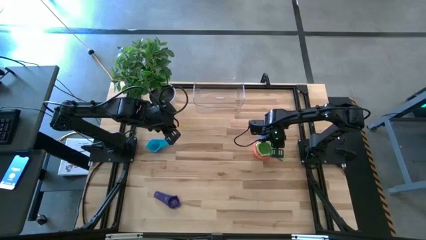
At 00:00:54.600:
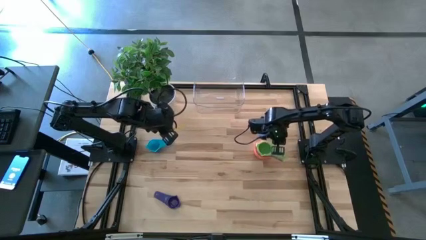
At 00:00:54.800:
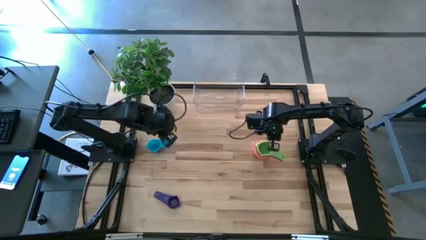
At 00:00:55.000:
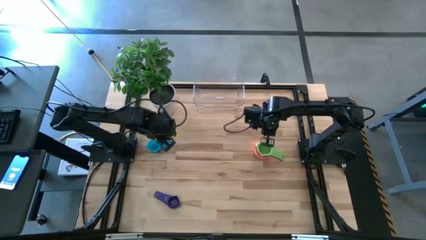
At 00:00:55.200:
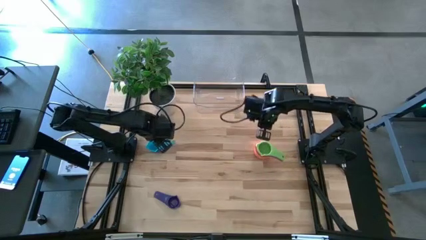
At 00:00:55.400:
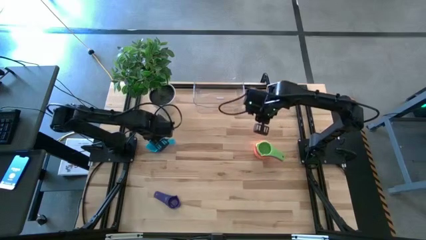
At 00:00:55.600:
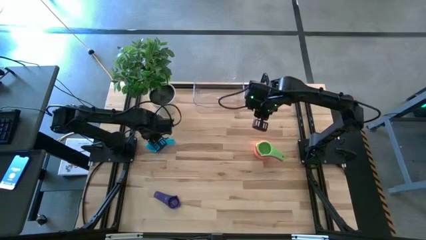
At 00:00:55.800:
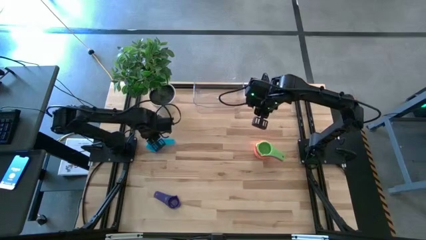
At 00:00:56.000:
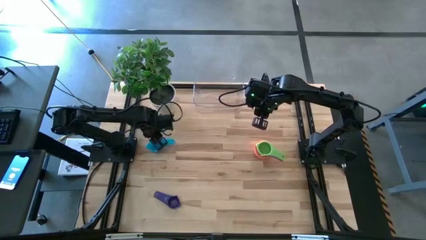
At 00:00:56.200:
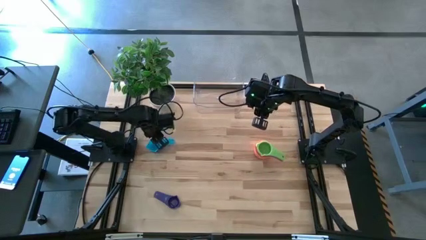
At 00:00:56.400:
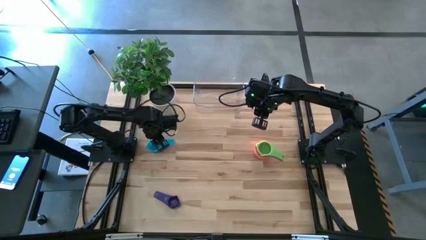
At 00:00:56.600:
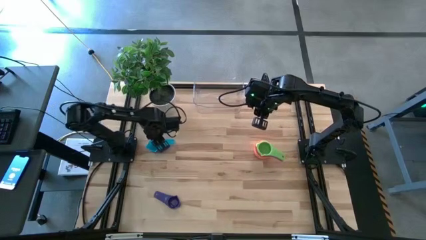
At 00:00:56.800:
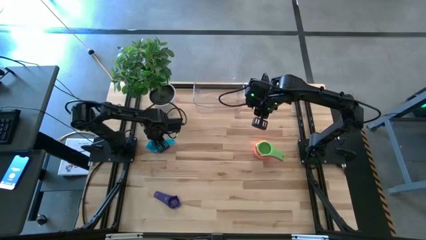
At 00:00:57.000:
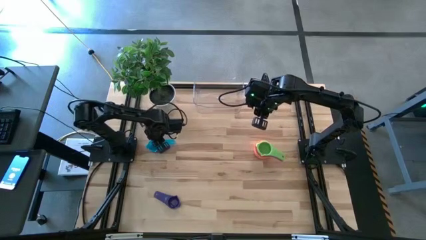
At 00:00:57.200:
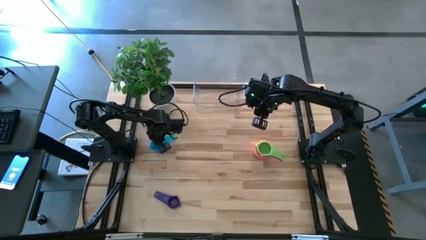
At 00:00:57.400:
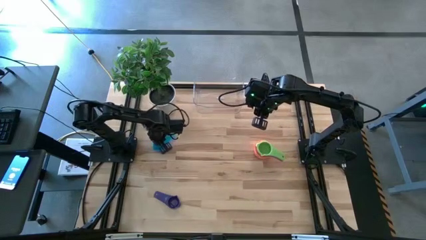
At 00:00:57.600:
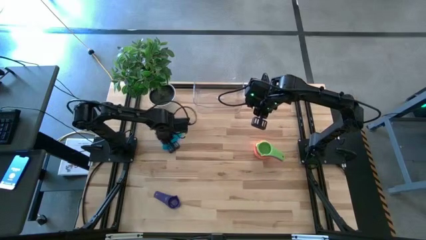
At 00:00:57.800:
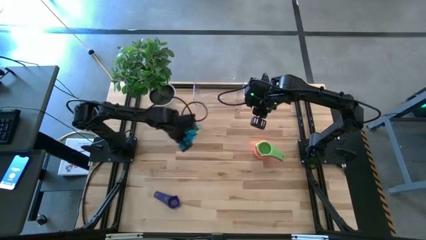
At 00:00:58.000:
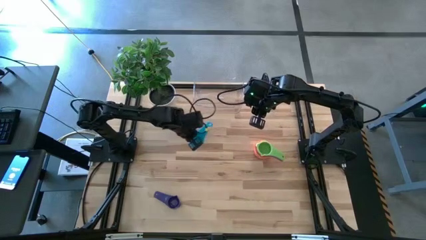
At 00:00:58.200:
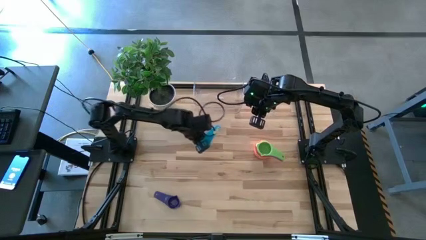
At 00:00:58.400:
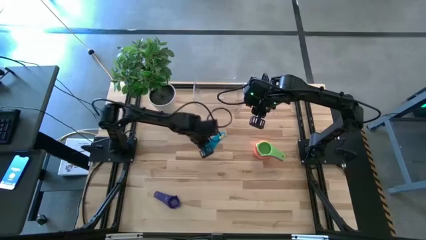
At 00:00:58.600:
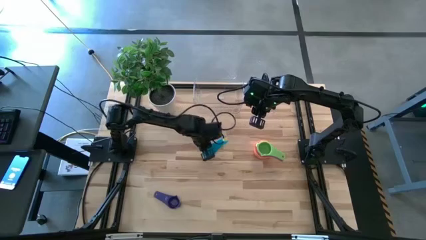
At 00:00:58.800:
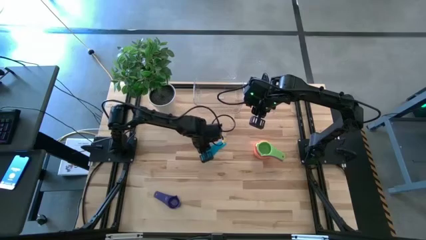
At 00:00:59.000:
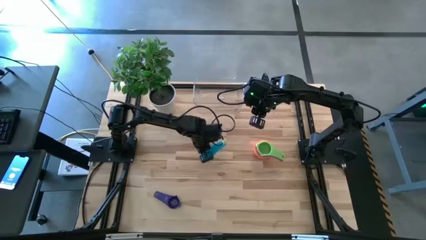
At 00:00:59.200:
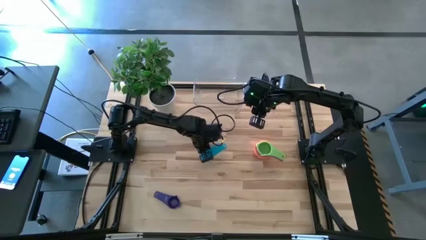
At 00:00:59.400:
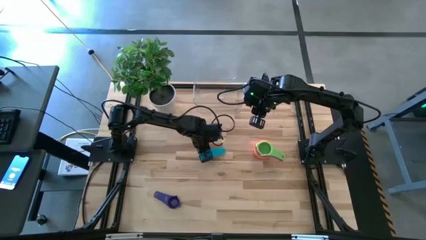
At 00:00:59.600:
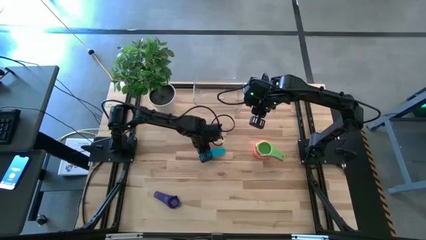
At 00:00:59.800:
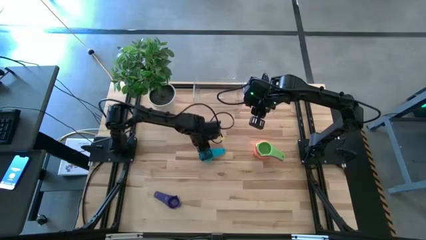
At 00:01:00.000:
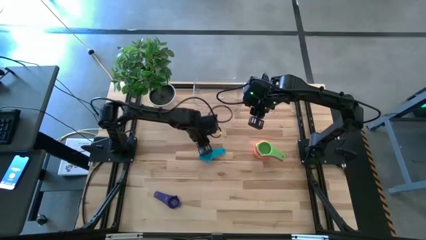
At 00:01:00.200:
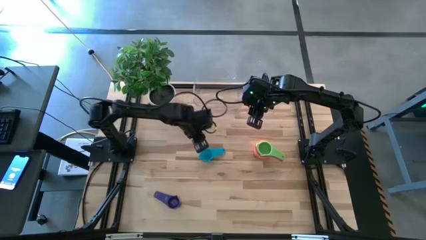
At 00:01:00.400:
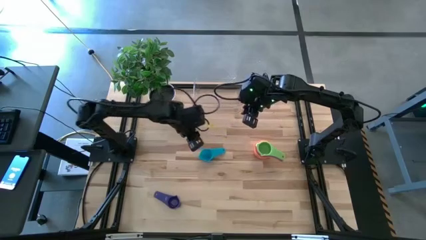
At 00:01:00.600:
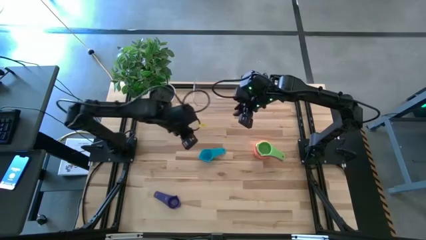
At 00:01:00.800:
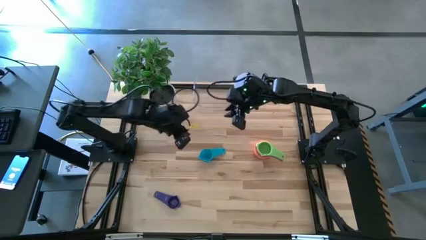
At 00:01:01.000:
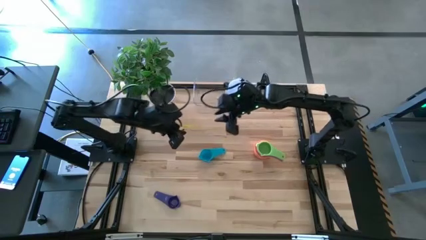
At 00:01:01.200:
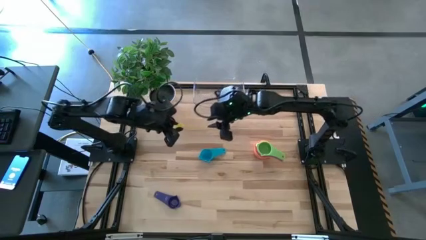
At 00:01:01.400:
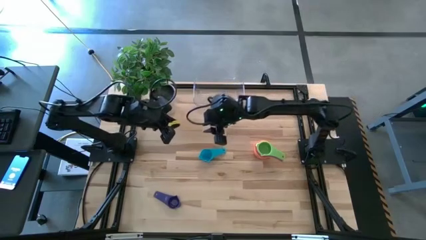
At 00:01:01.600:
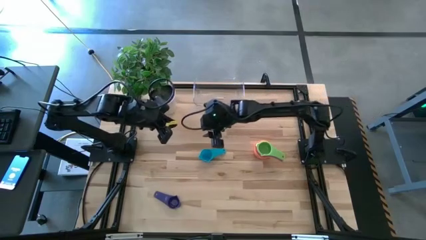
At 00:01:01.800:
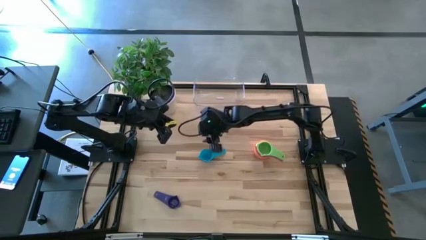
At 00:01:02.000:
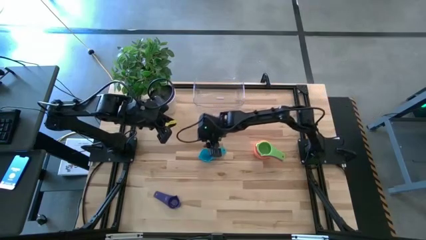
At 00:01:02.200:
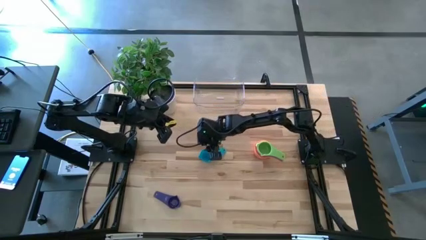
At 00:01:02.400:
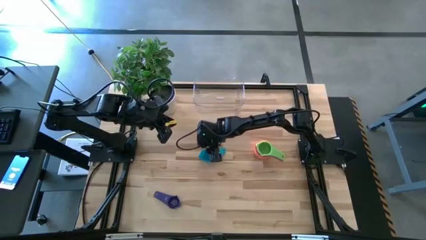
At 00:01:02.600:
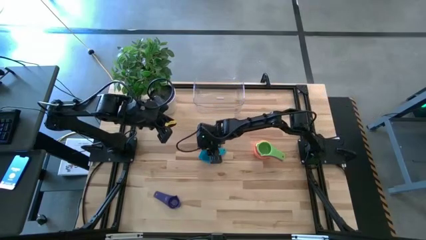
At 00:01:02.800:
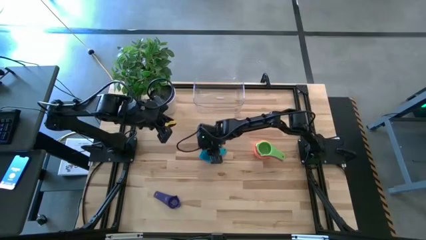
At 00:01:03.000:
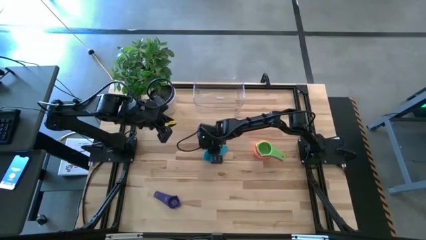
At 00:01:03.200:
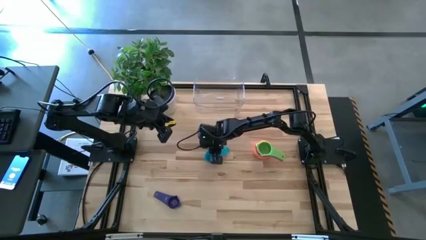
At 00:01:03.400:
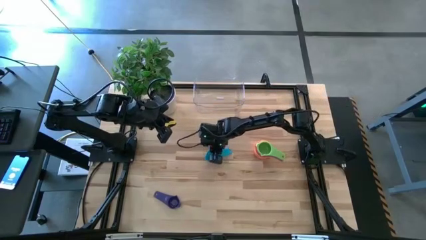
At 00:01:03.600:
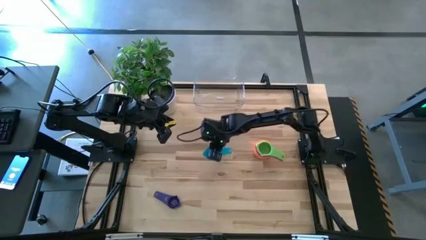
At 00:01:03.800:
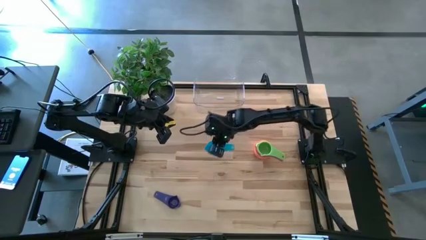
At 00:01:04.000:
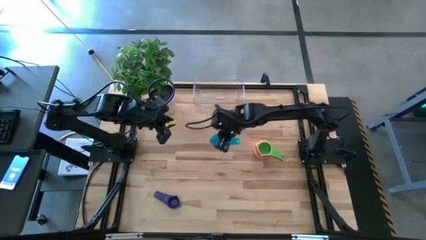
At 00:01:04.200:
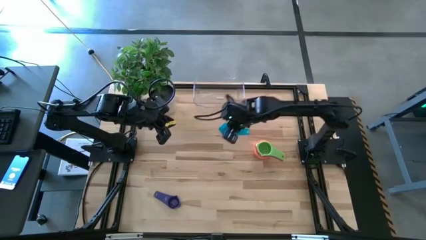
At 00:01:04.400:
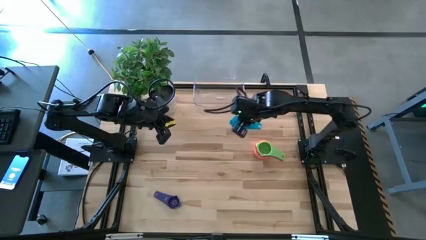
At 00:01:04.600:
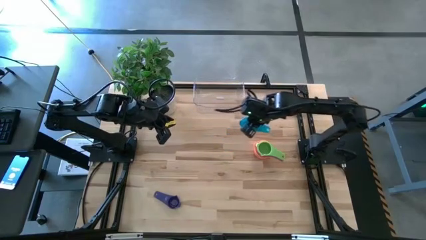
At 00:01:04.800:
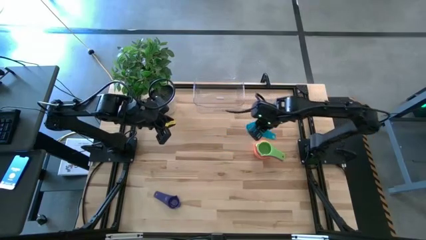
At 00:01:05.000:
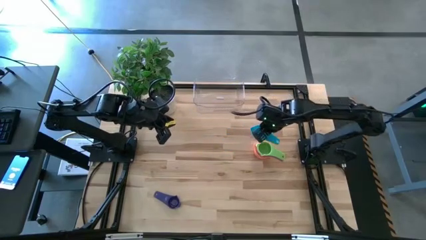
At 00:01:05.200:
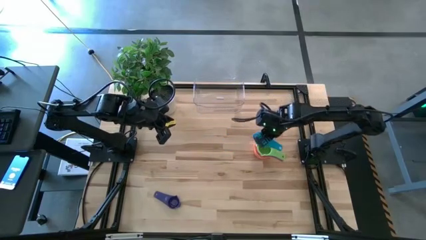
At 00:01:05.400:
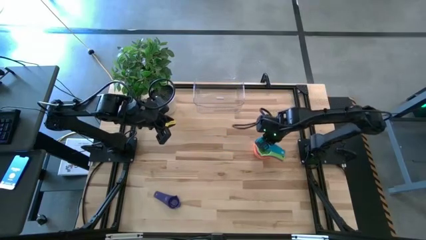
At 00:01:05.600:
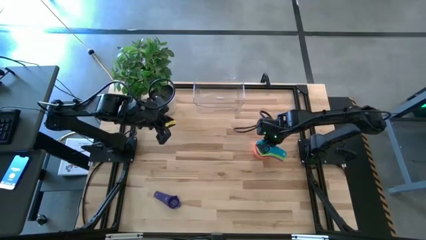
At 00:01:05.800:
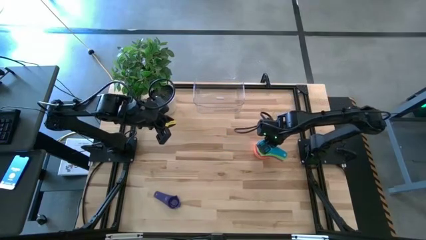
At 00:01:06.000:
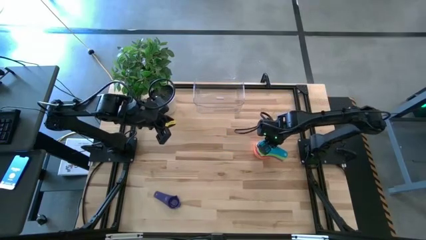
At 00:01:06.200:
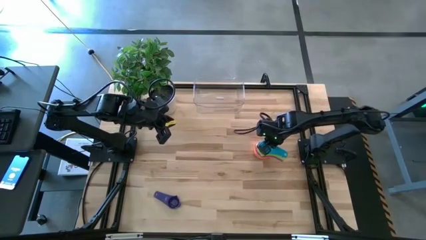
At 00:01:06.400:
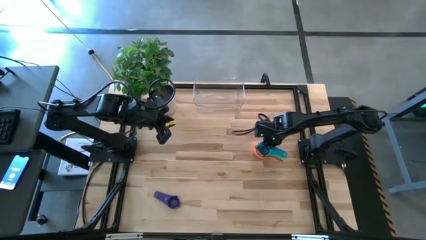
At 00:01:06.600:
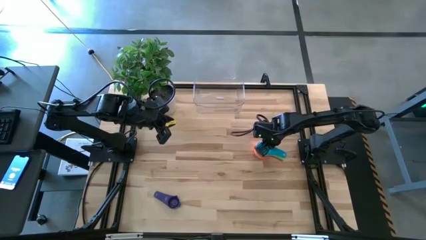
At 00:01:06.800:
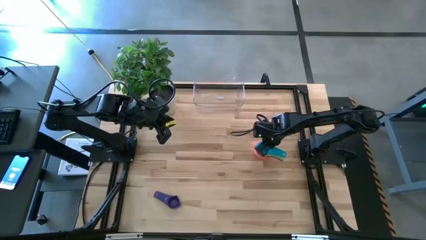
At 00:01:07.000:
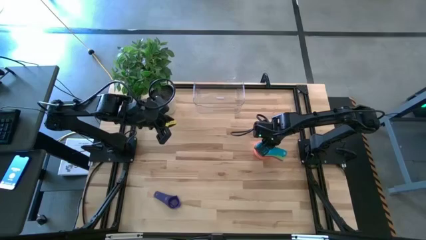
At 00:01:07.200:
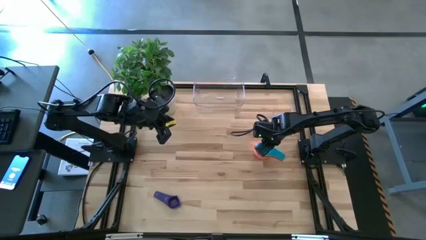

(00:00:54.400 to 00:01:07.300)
Task: Nest measuring cups in basket
Stack the light blue measuring cup on top of the green measuring cup
